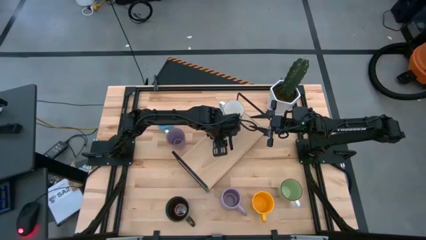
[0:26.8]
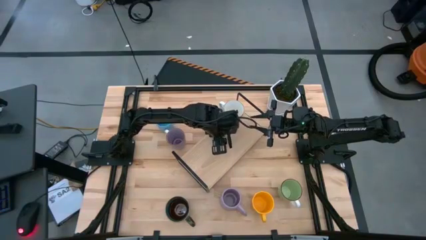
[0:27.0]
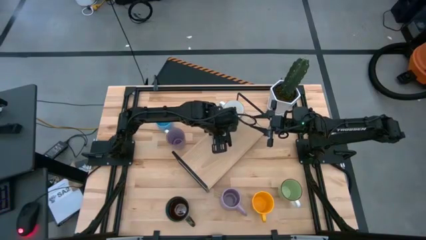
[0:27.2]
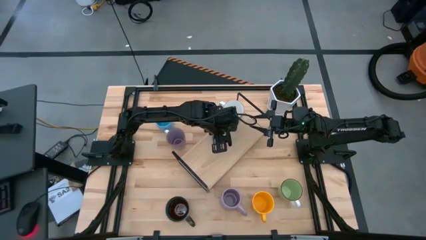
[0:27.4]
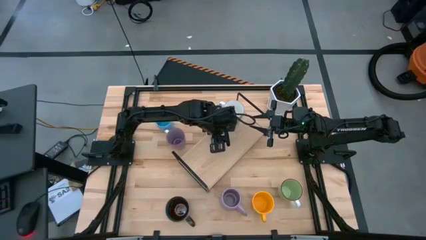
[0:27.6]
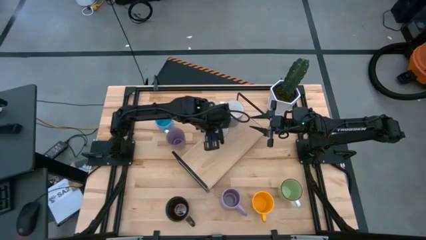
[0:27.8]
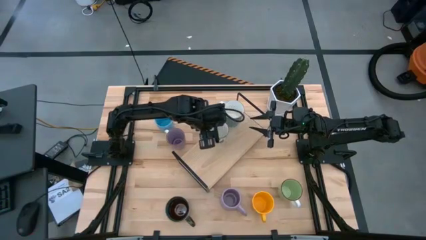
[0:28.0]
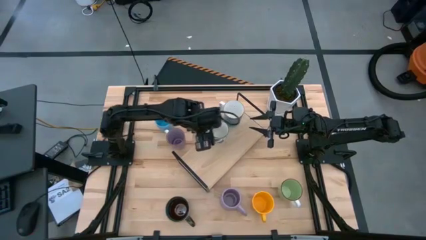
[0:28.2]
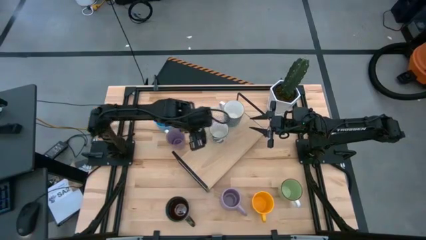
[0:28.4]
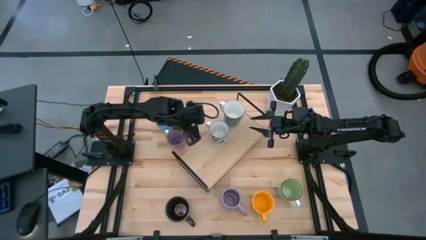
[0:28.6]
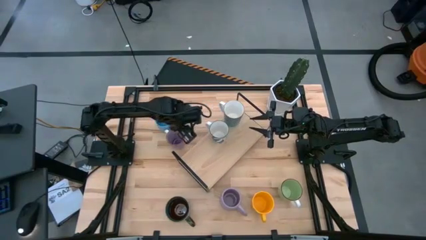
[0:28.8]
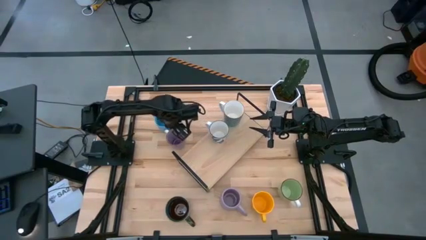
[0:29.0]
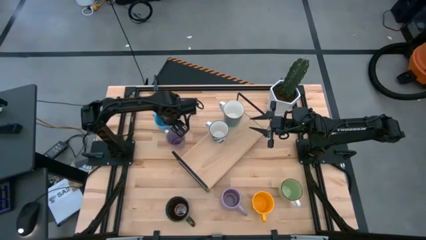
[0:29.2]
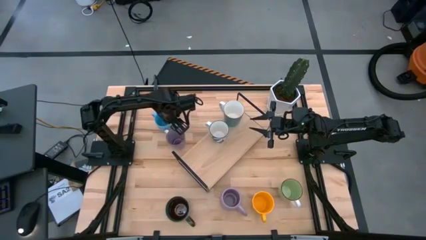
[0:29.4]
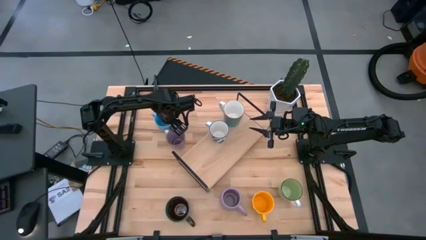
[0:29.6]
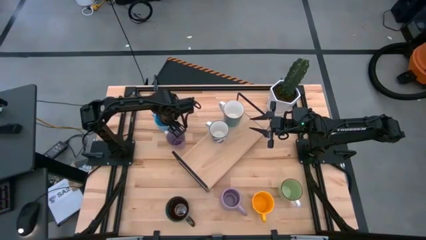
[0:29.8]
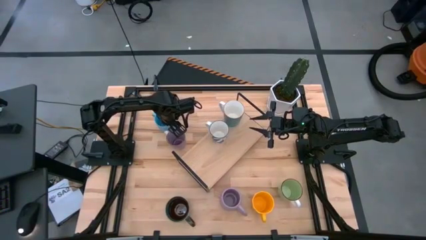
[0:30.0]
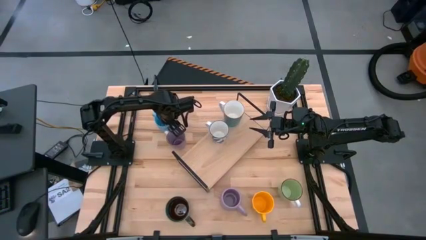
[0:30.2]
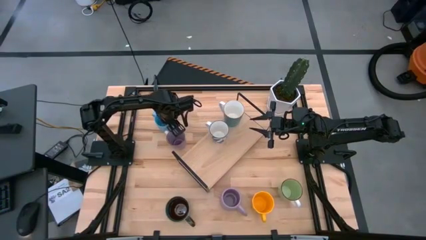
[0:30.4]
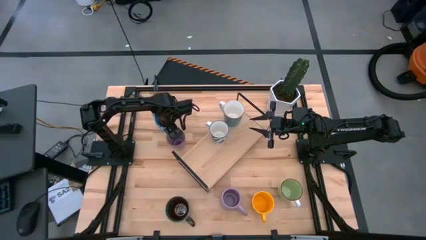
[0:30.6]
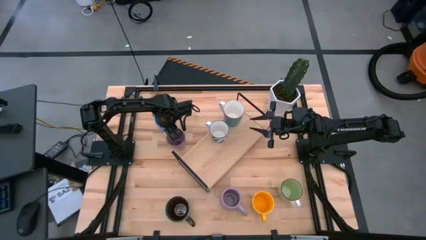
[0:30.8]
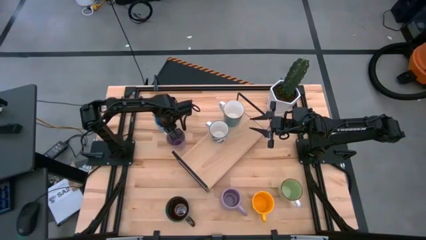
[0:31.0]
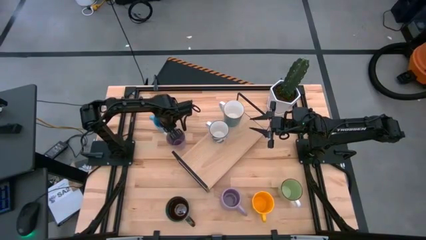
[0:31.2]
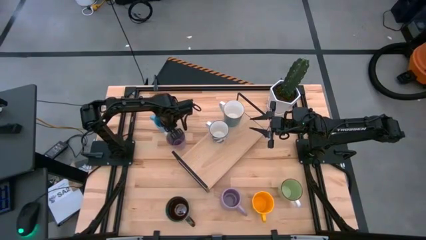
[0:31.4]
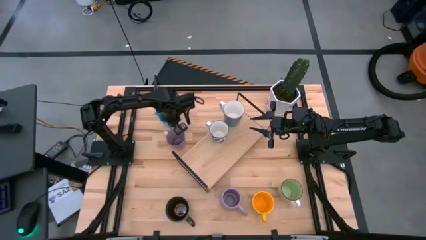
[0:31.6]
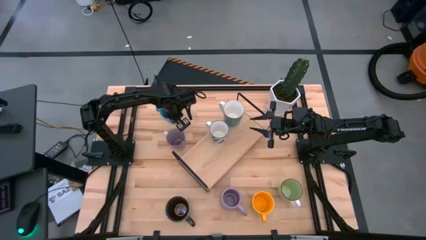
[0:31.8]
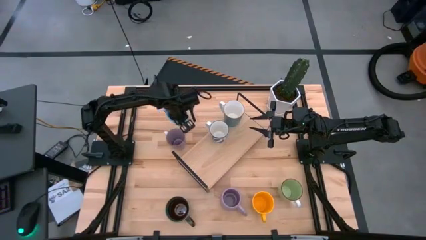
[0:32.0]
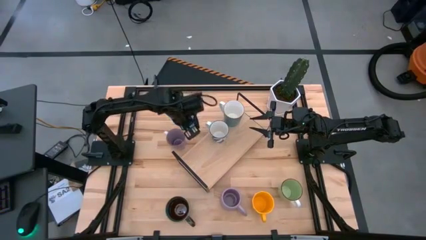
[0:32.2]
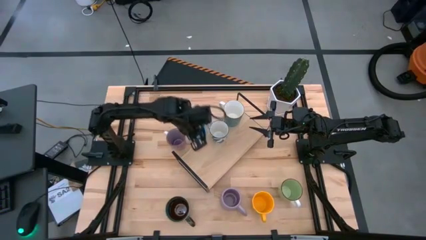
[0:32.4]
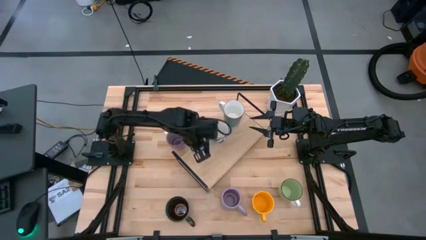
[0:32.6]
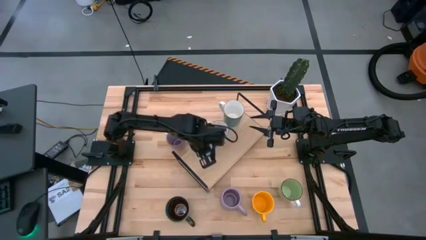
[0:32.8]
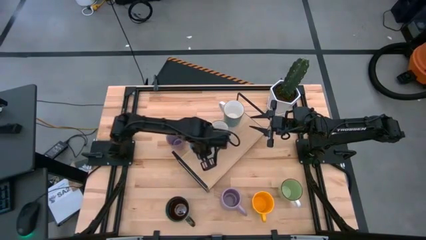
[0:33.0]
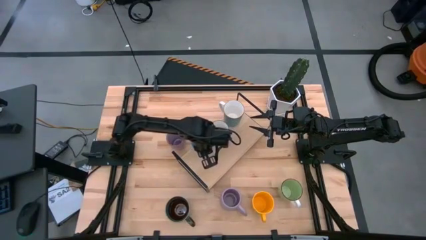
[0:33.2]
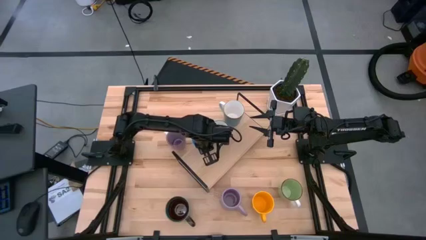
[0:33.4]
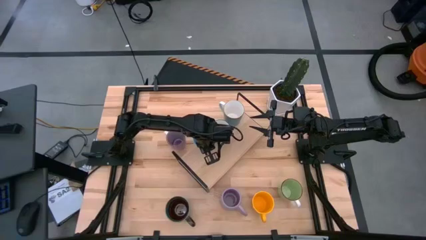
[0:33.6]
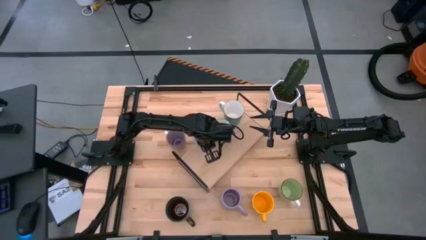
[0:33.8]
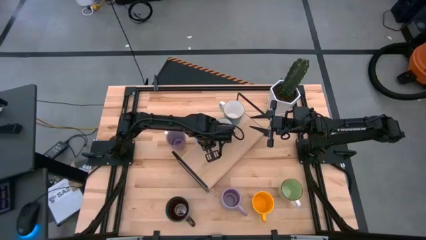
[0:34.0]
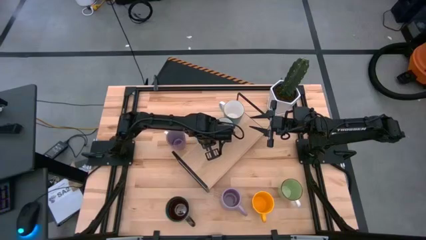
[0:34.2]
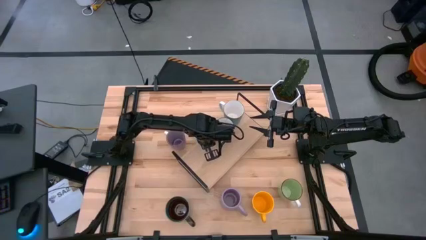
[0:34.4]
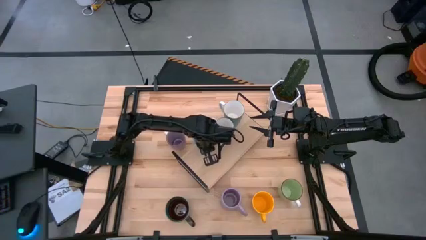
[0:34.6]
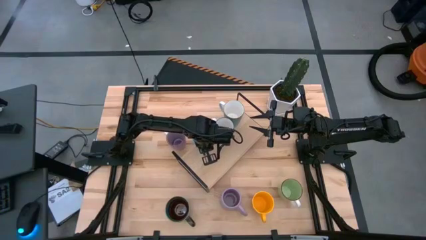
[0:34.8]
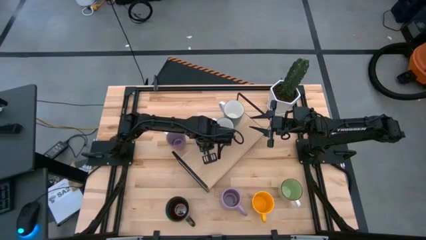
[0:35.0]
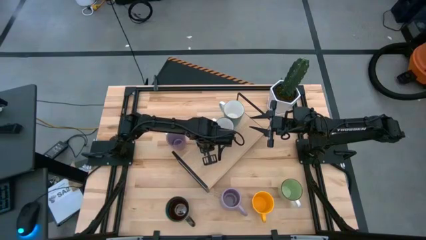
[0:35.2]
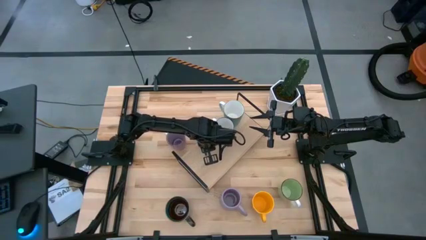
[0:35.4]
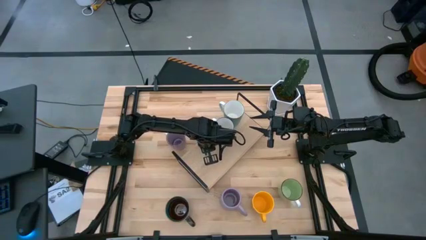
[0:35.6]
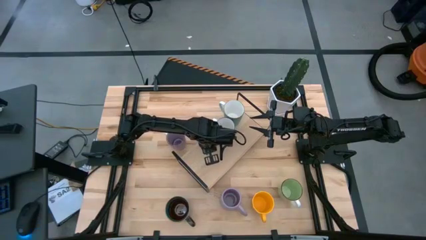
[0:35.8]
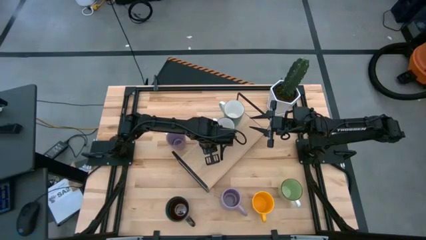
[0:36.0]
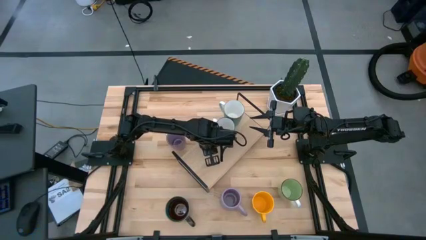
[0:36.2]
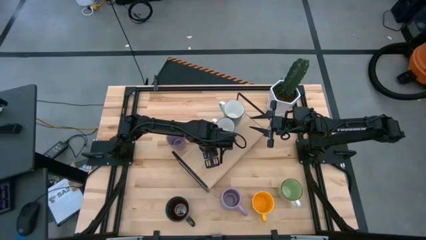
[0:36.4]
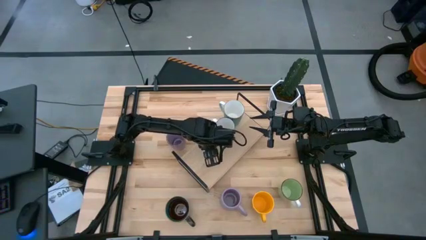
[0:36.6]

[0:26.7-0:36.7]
Task: Place coffee mugs
Put the light blue mug on the shelf

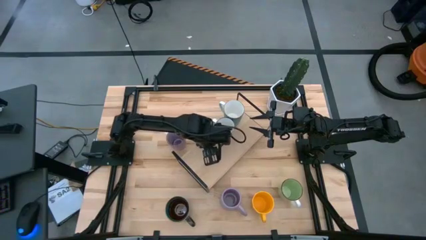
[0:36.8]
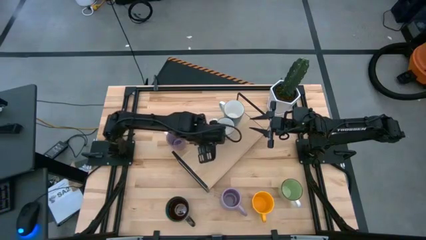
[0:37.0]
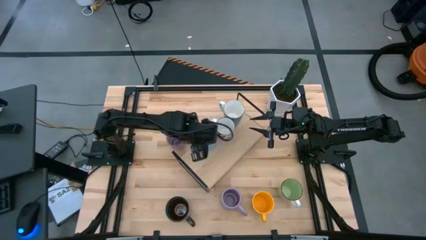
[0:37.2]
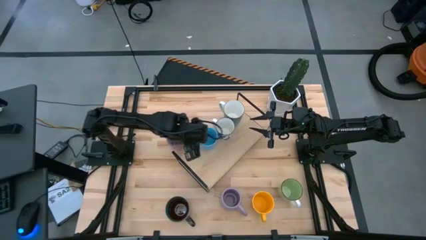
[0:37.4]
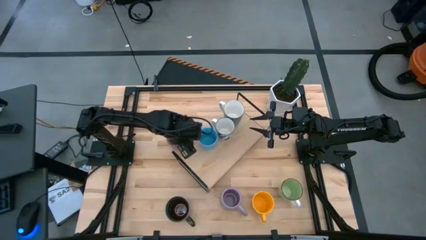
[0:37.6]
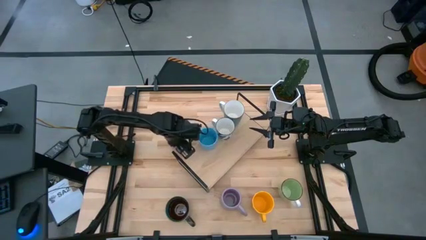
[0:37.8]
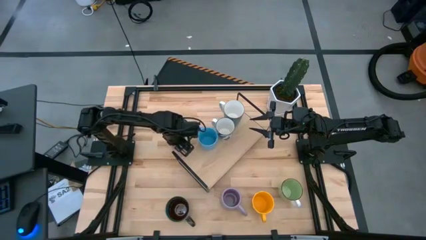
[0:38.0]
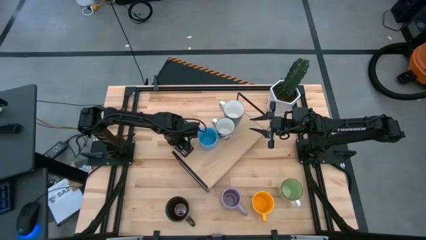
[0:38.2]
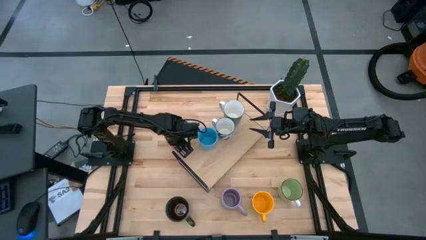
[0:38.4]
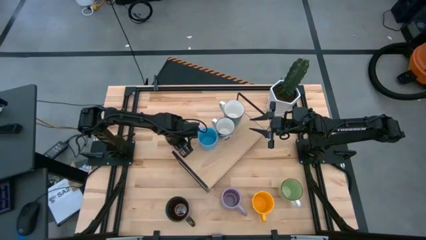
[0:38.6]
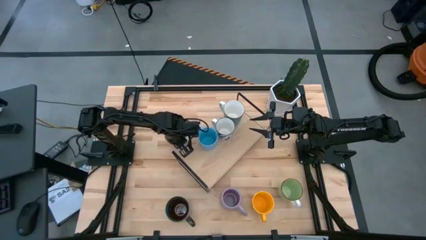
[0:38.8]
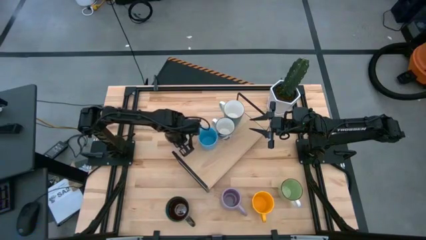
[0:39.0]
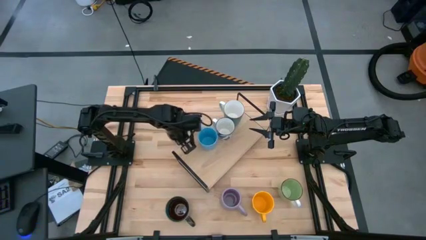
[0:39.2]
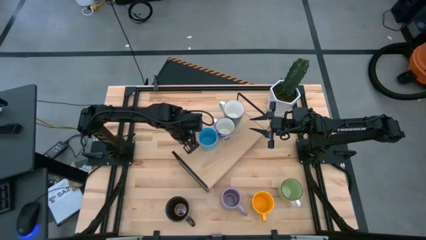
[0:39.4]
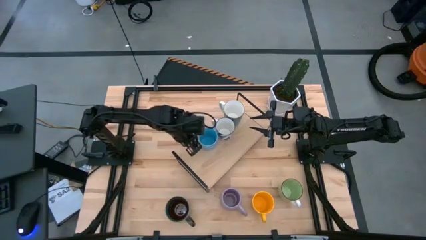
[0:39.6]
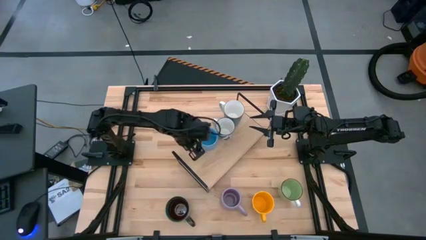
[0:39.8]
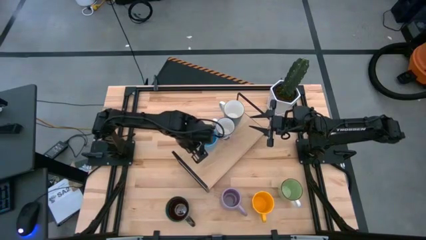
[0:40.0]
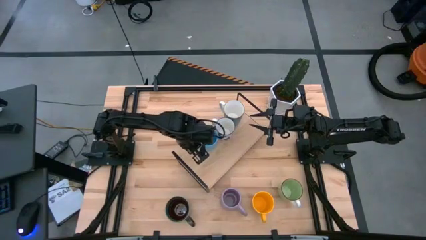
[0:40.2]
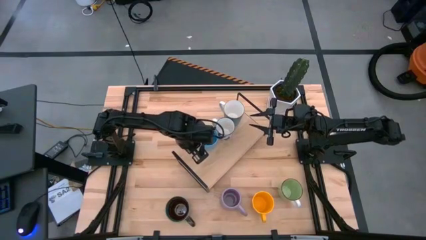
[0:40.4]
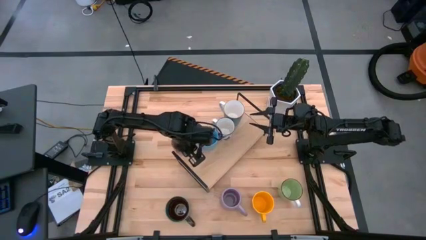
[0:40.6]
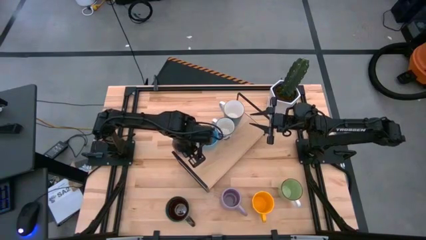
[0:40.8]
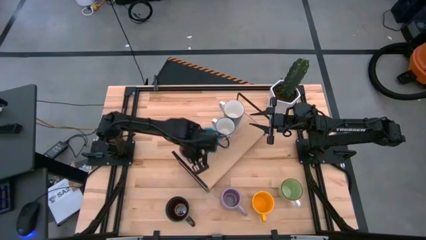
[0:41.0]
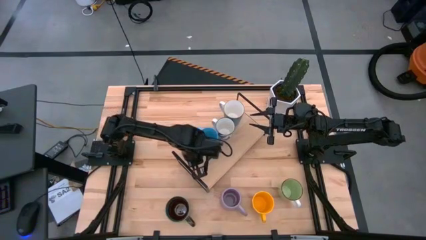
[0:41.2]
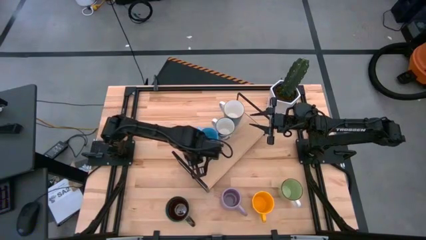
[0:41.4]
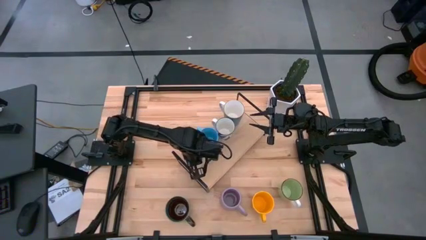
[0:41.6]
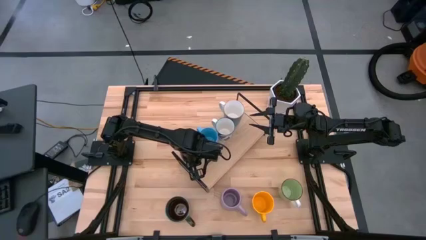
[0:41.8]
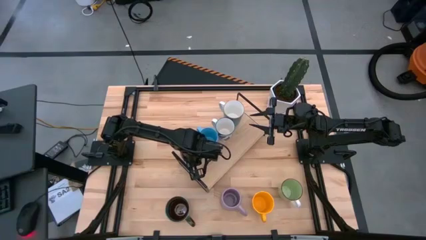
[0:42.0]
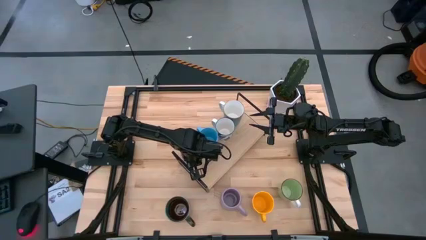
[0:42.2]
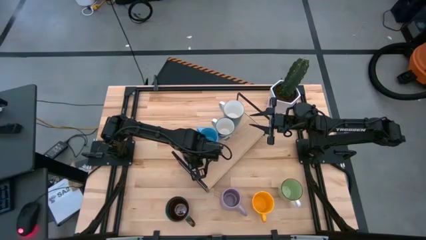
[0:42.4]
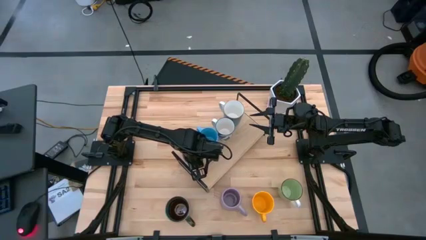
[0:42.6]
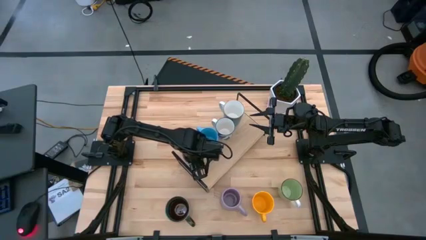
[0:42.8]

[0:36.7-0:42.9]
Put the top purple mug on the shelf
